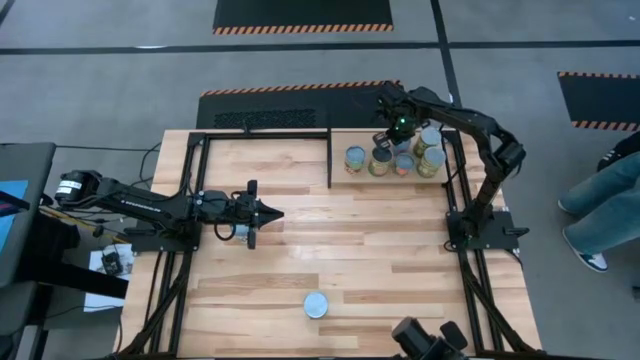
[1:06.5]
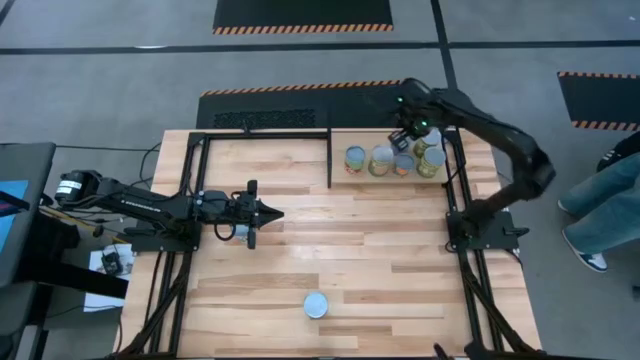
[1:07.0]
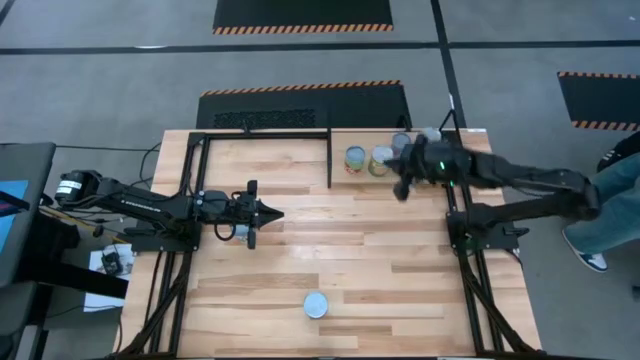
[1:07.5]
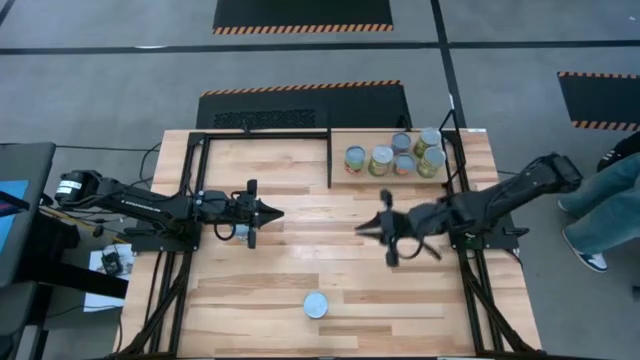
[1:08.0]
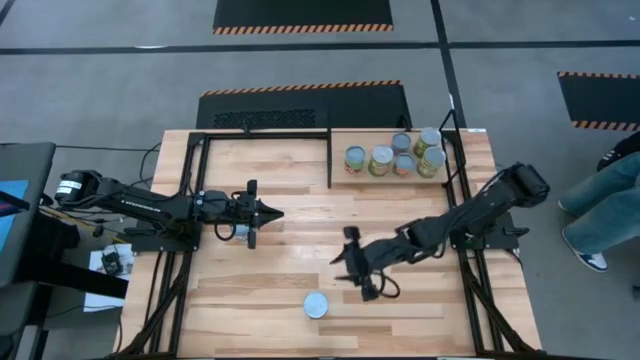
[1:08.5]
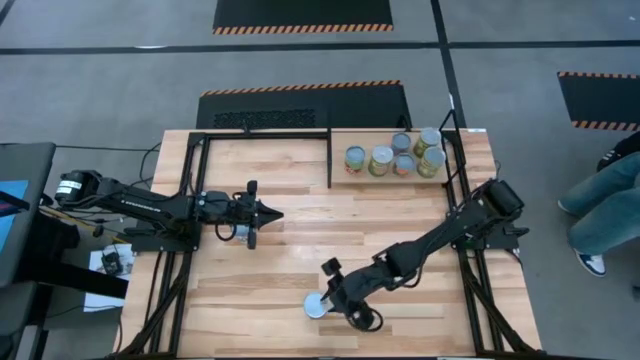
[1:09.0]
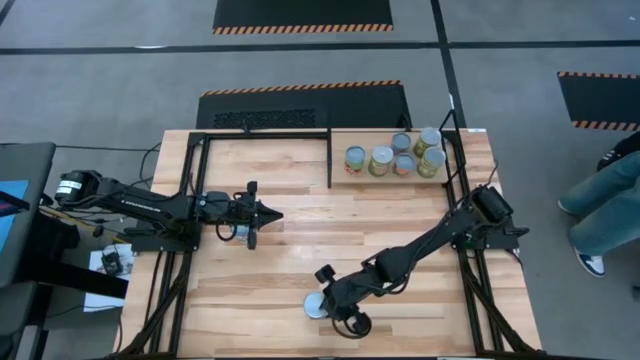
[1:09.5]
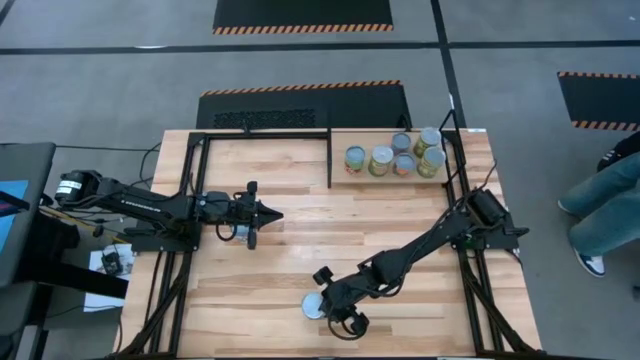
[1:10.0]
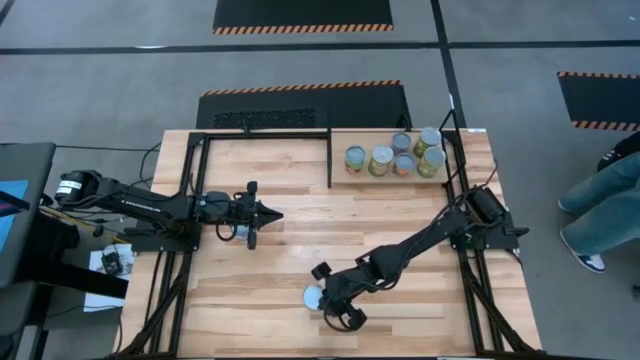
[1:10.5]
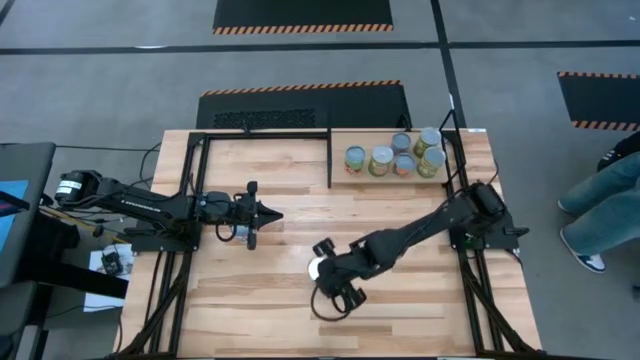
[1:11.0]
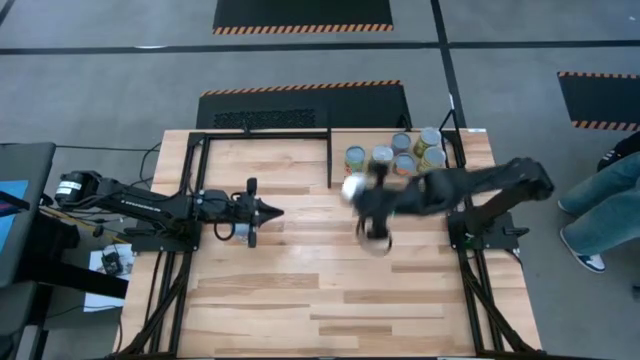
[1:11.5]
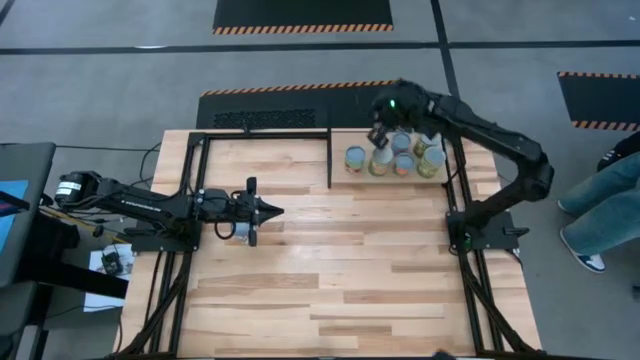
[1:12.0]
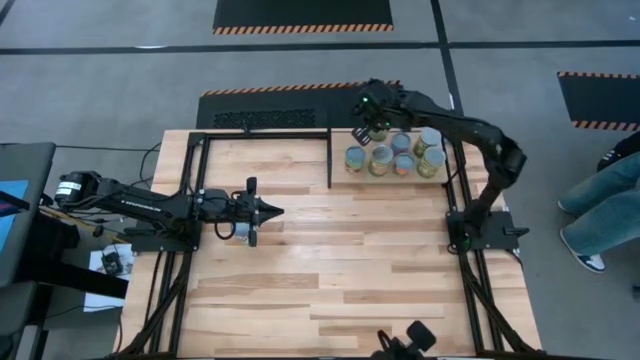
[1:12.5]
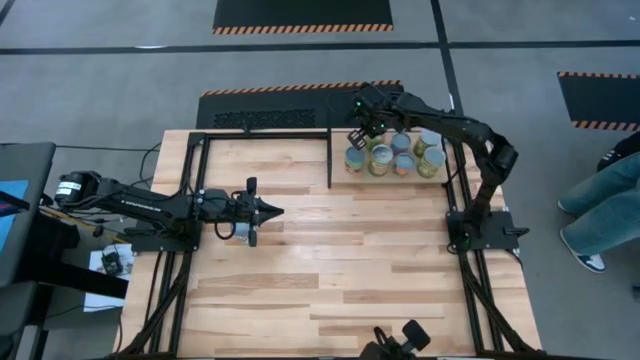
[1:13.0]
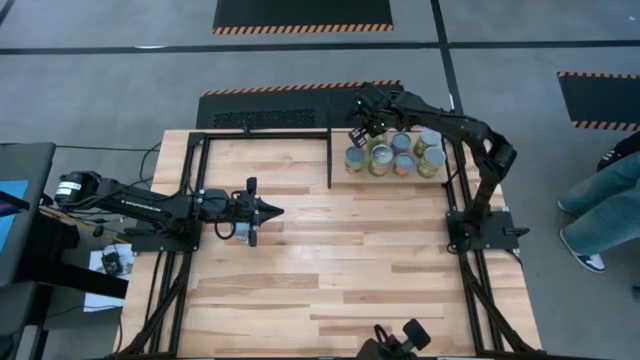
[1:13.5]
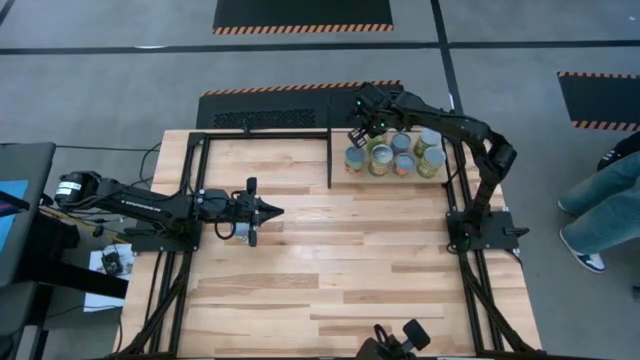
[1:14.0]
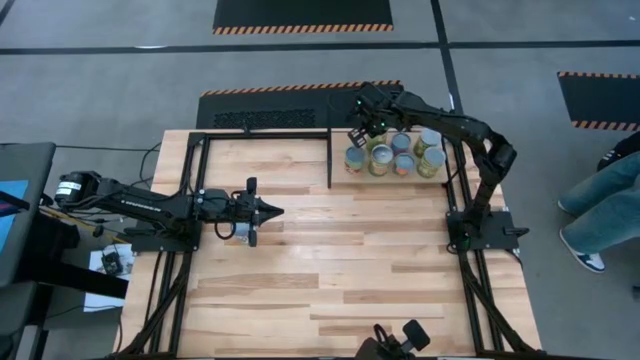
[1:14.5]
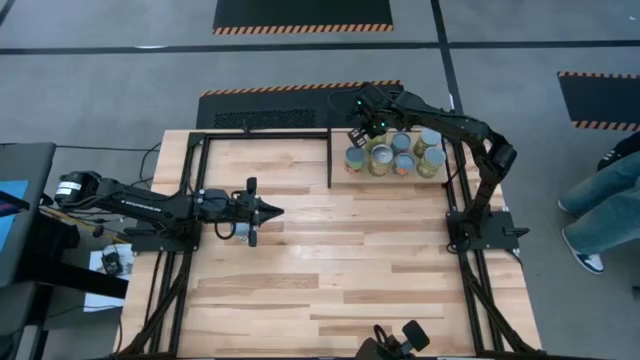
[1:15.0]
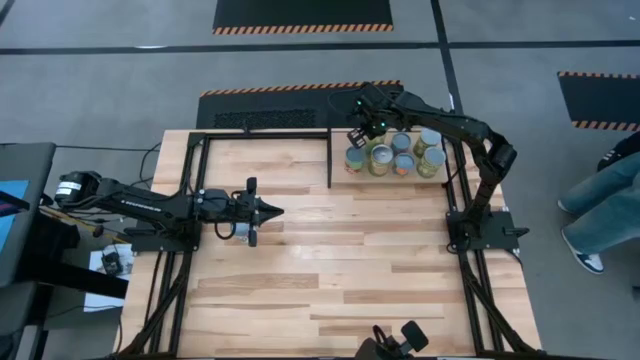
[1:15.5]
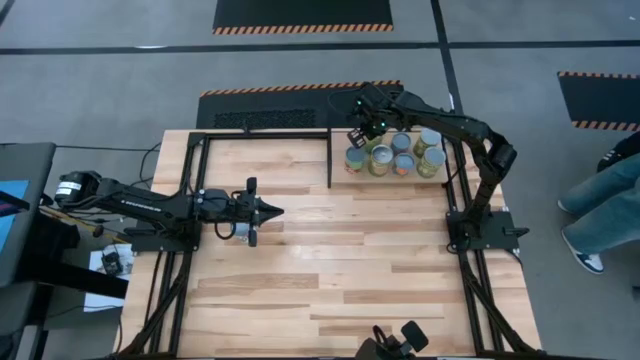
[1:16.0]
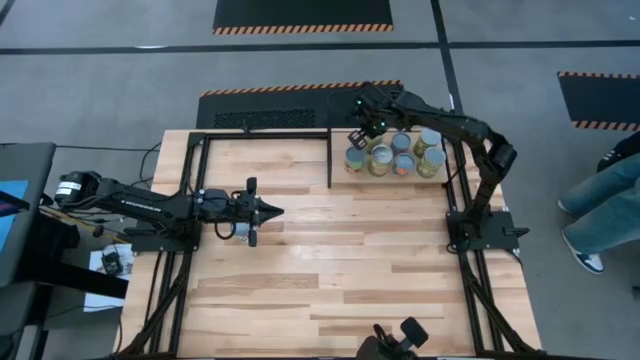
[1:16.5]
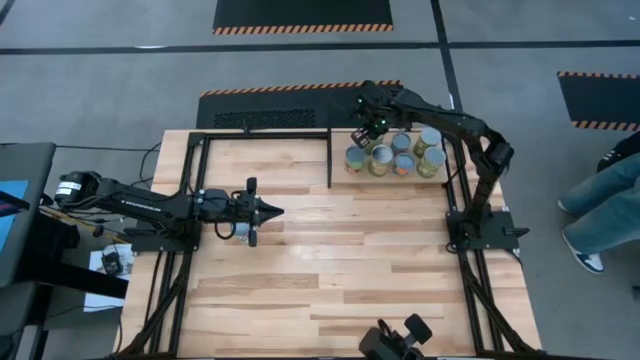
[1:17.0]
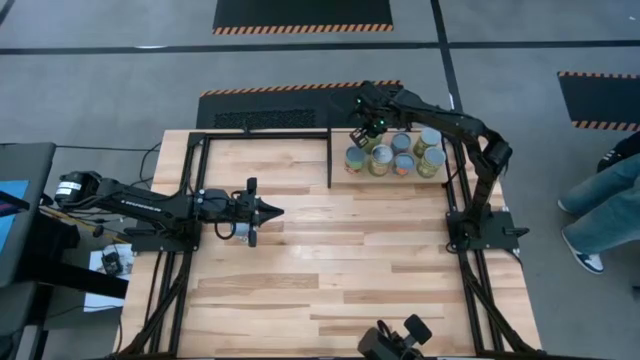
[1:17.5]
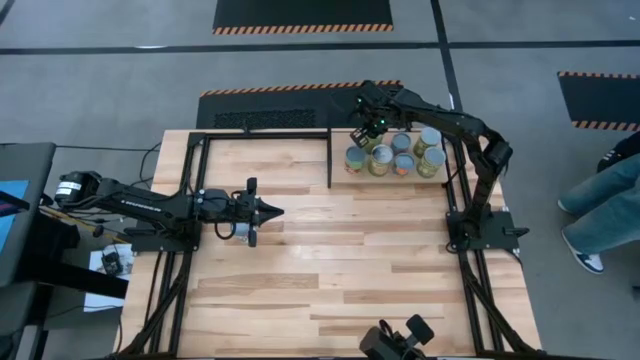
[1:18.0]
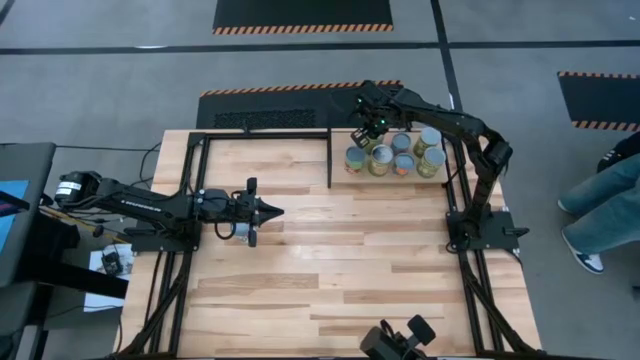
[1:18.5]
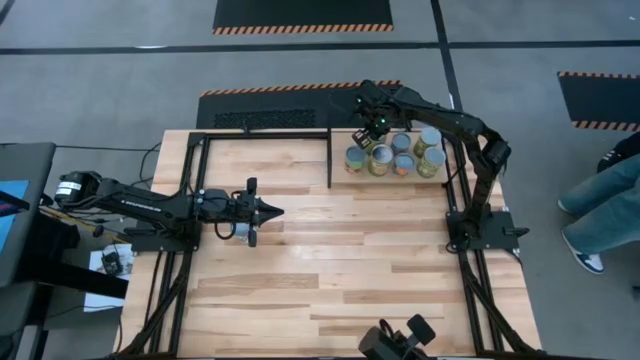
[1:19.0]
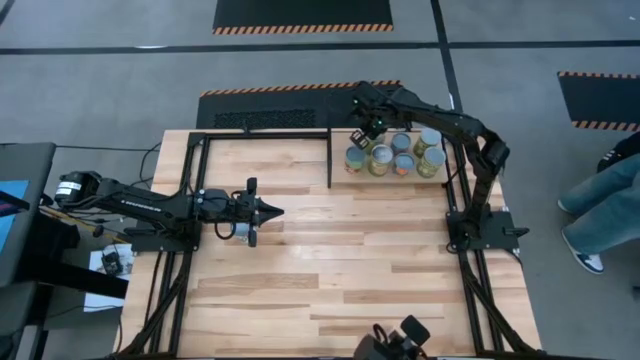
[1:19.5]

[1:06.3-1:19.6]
Task: Pick and place cans onto a shelf
Put the large canned oranges on the shelf

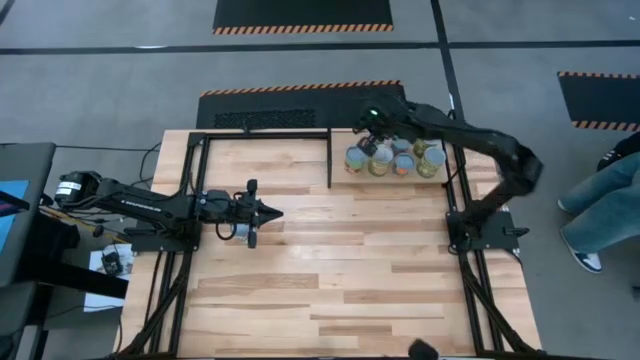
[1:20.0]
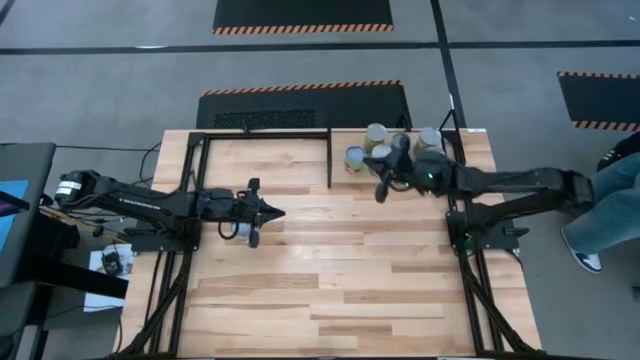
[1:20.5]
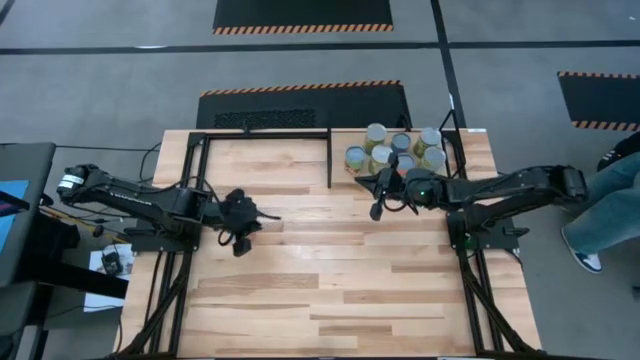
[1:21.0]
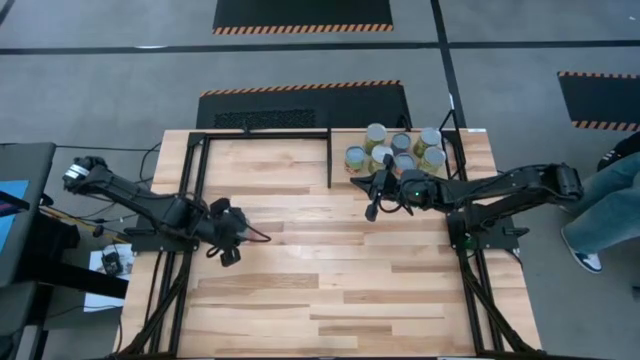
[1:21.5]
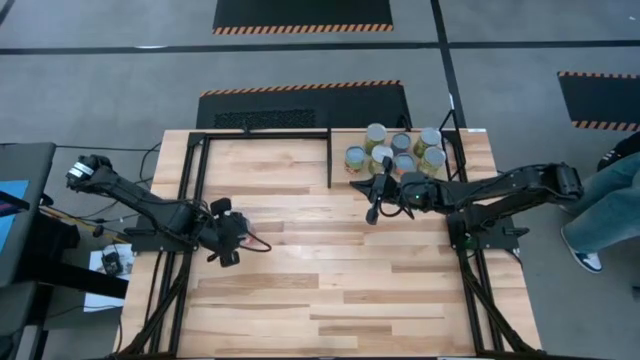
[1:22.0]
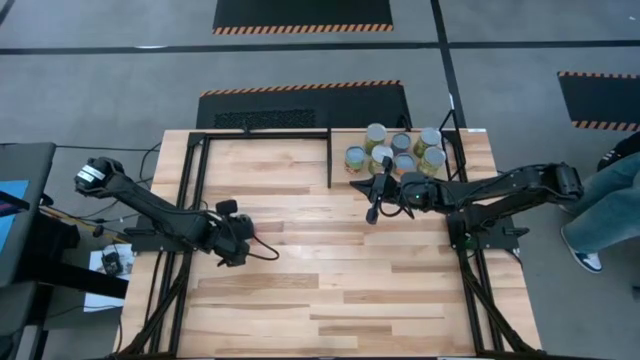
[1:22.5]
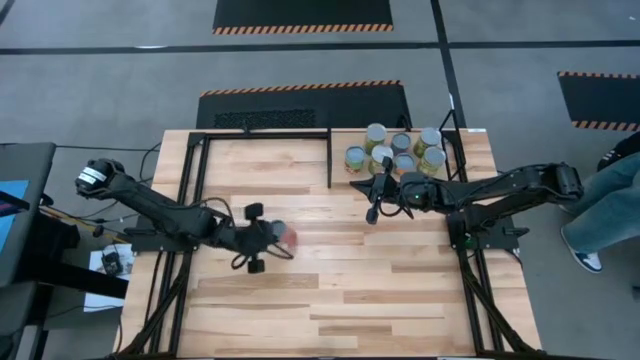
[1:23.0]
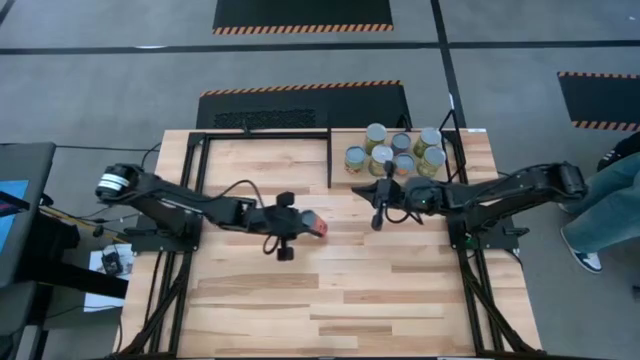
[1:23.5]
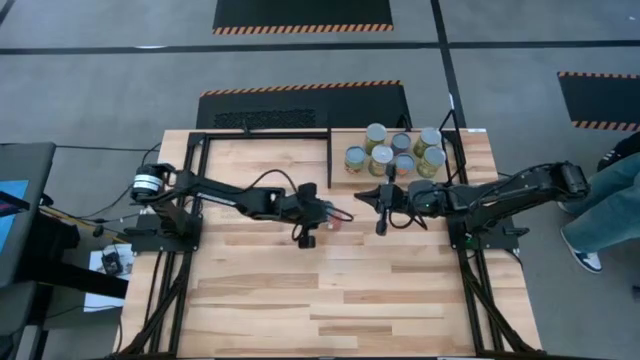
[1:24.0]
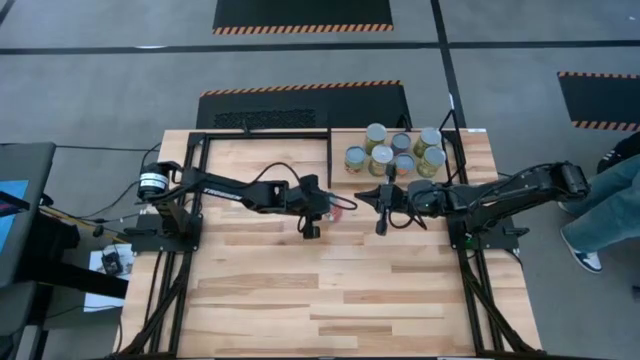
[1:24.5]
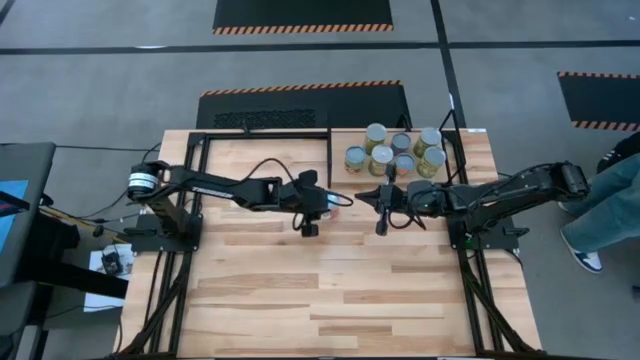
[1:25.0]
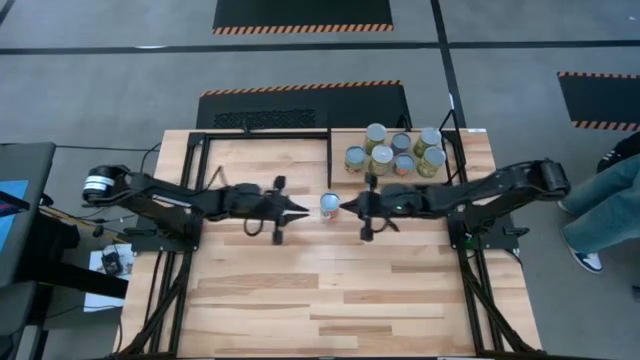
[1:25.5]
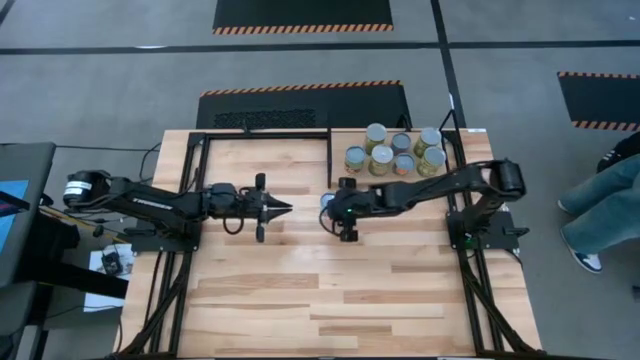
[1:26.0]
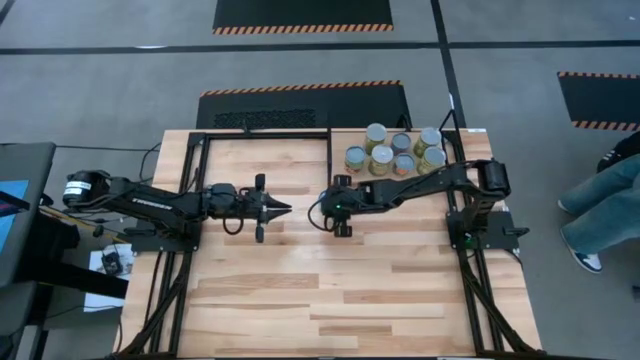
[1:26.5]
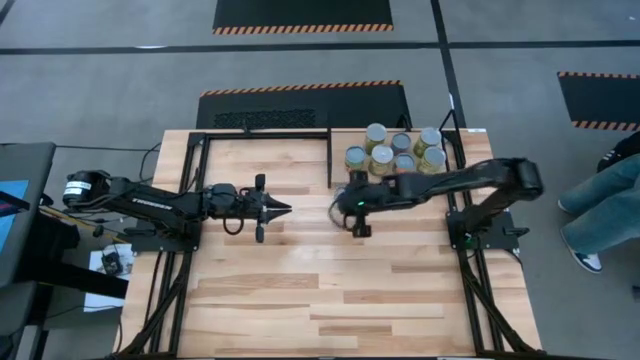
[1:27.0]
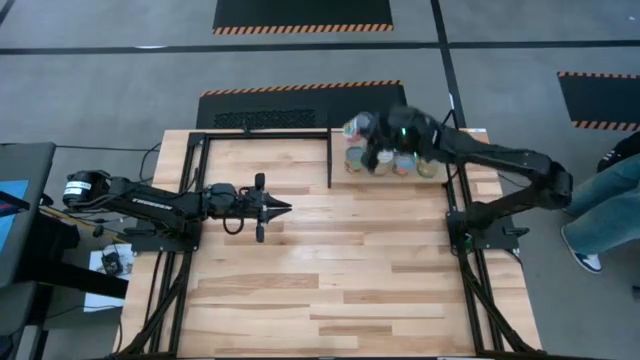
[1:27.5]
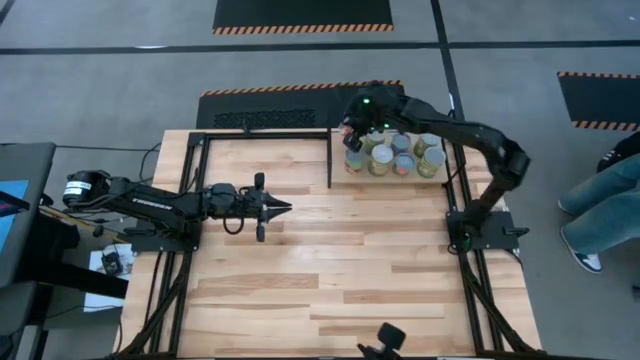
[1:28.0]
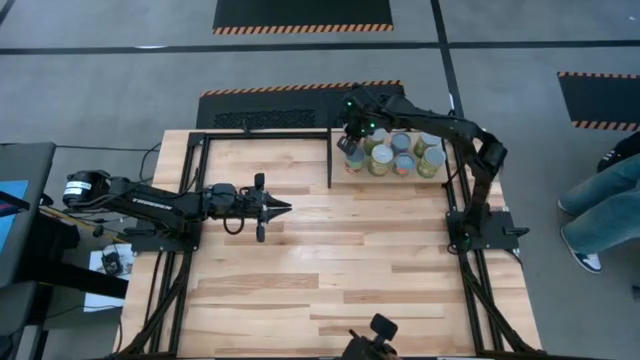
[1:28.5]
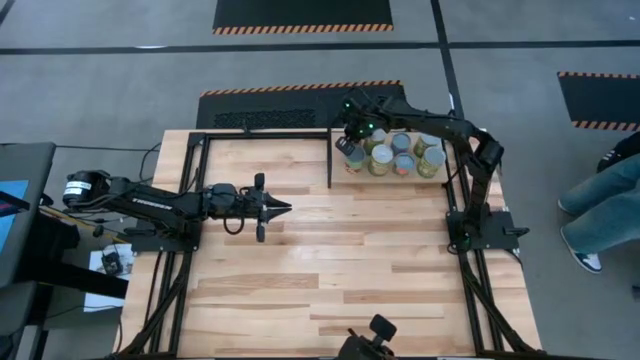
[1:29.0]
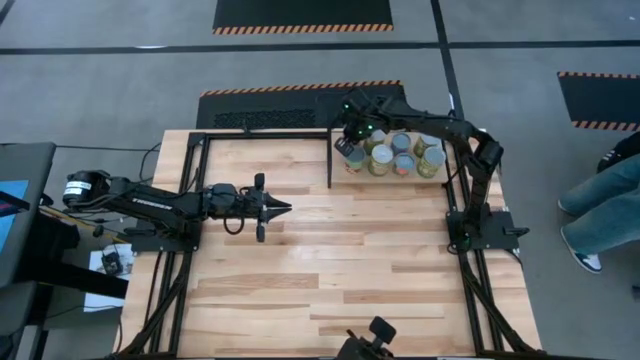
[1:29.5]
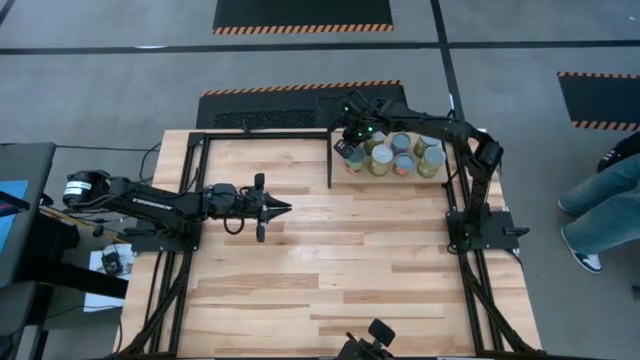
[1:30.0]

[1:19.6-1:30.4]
Put the canned mixed fruit on the shelf
